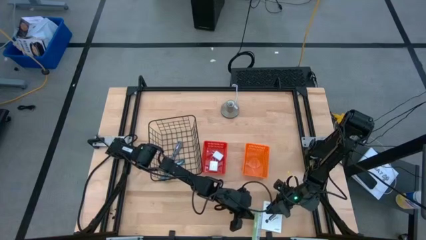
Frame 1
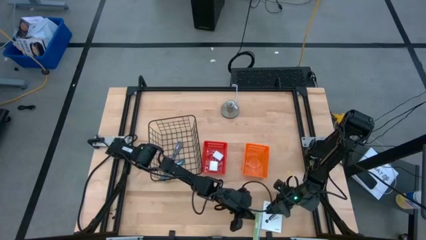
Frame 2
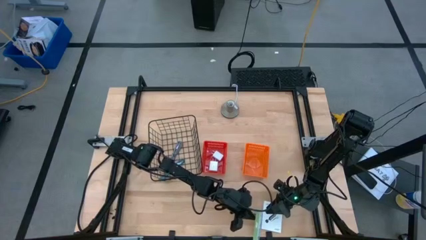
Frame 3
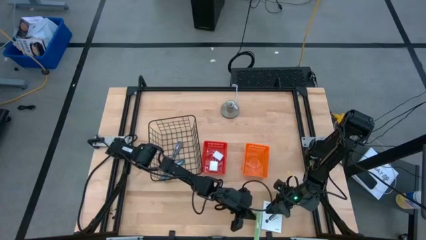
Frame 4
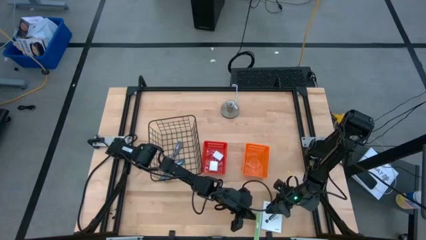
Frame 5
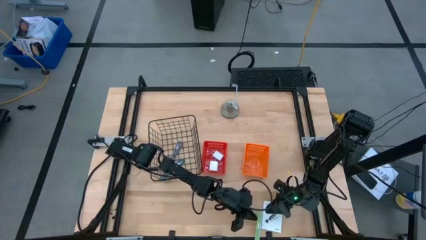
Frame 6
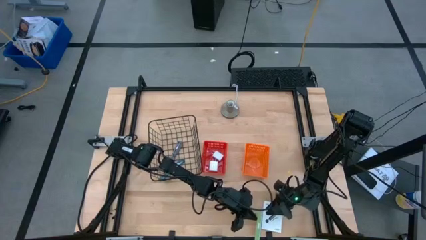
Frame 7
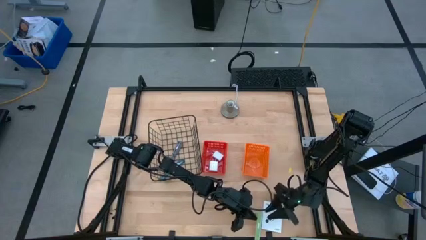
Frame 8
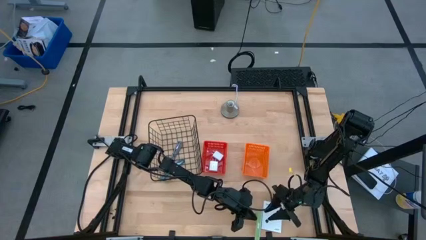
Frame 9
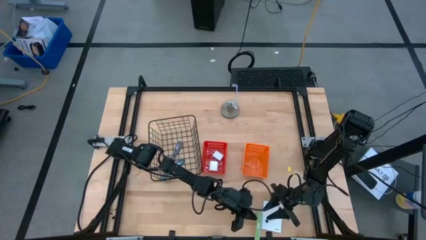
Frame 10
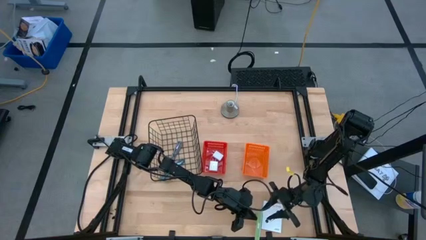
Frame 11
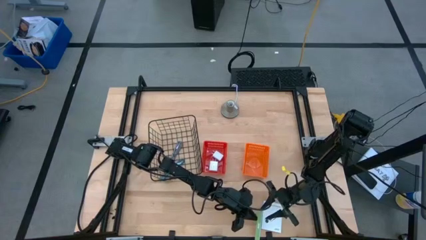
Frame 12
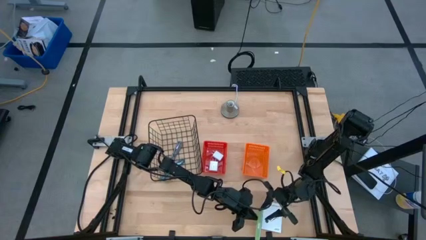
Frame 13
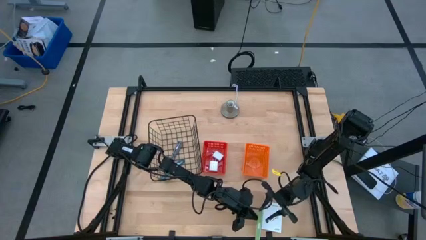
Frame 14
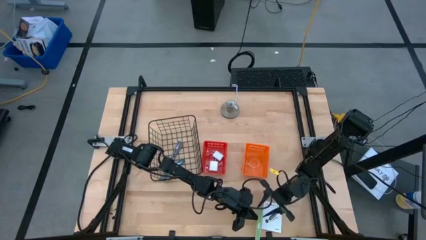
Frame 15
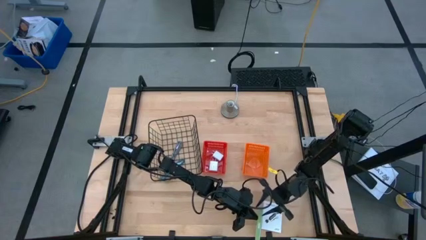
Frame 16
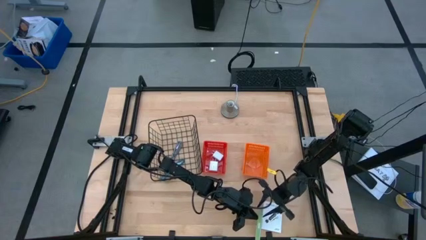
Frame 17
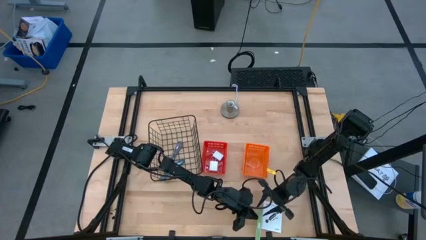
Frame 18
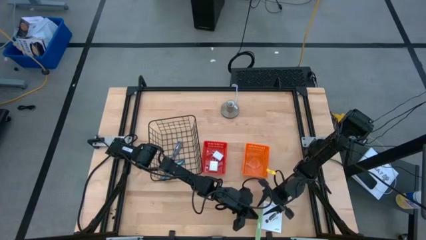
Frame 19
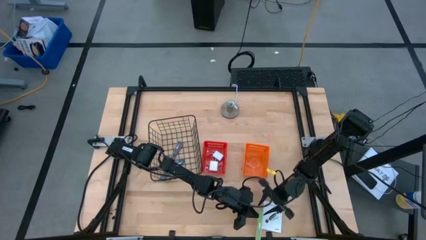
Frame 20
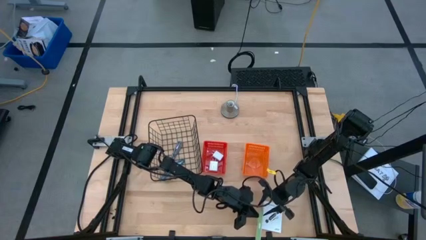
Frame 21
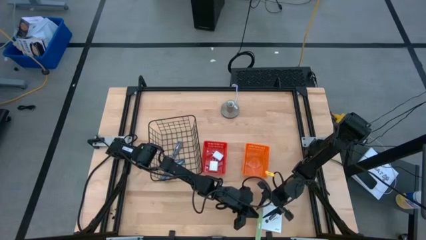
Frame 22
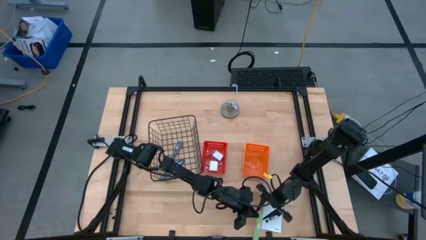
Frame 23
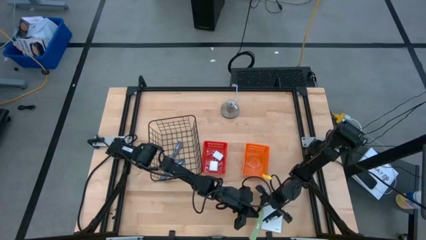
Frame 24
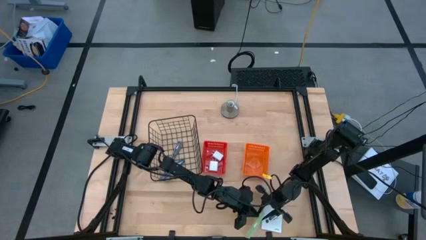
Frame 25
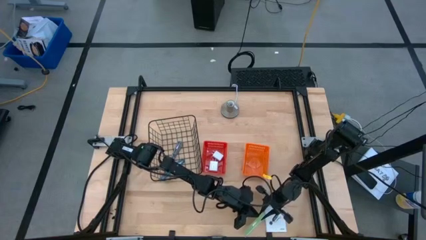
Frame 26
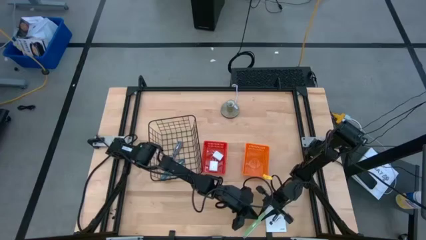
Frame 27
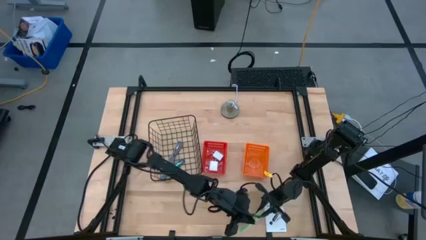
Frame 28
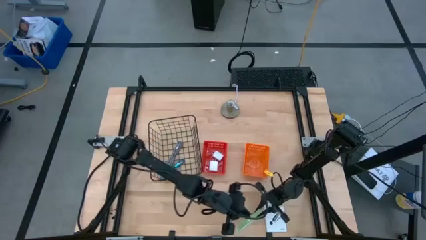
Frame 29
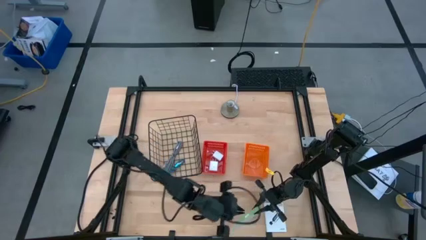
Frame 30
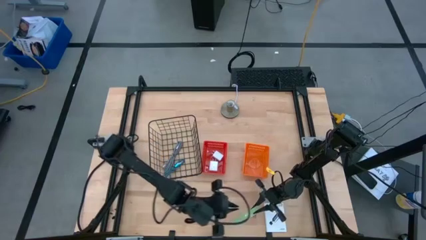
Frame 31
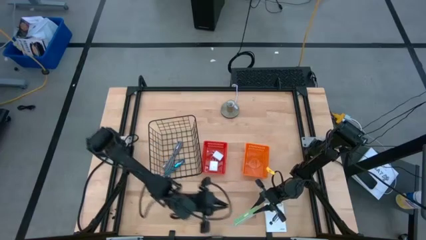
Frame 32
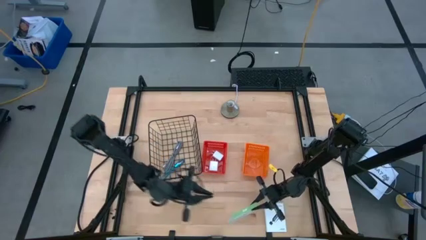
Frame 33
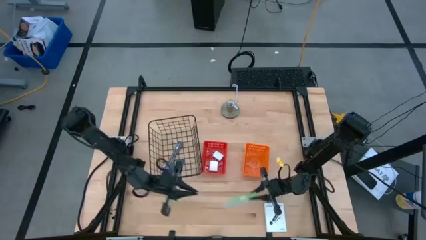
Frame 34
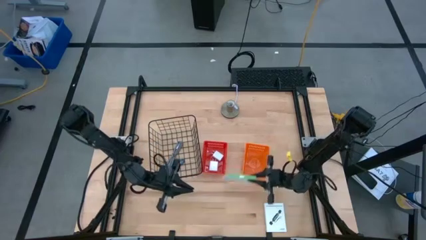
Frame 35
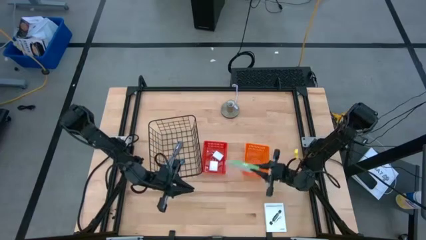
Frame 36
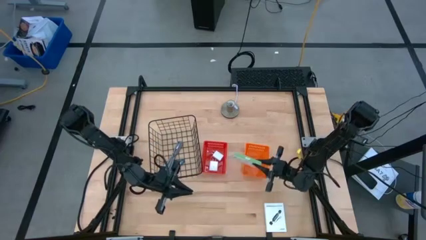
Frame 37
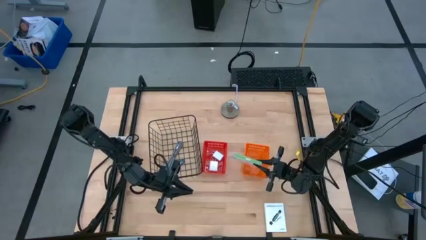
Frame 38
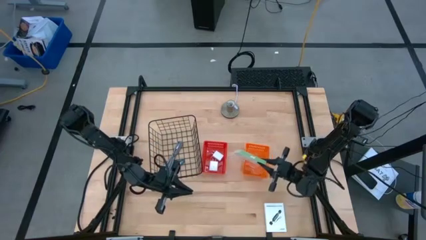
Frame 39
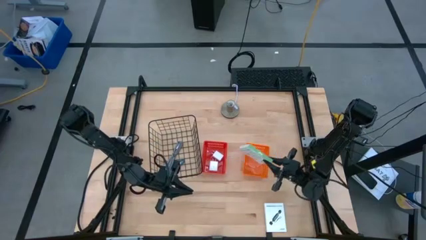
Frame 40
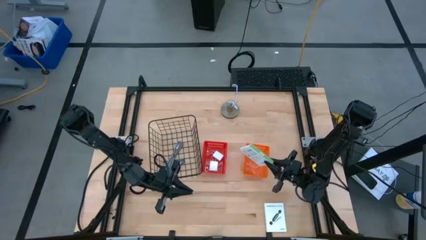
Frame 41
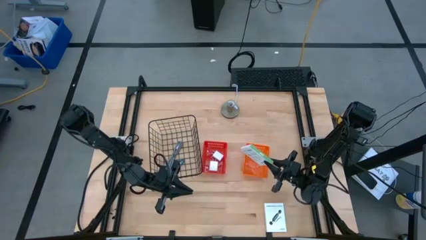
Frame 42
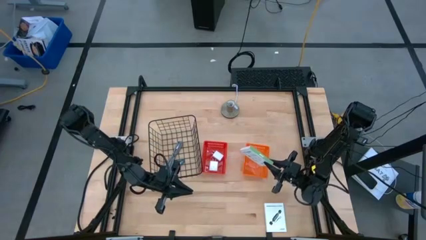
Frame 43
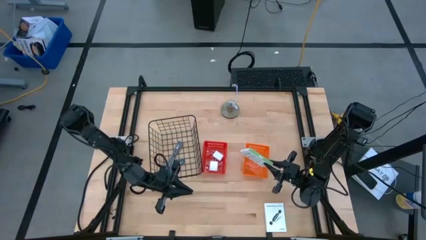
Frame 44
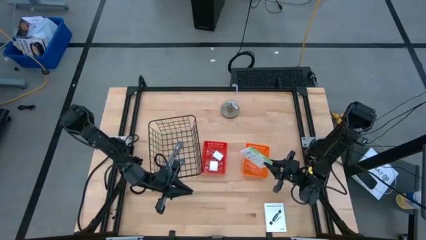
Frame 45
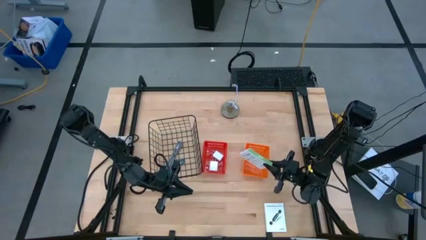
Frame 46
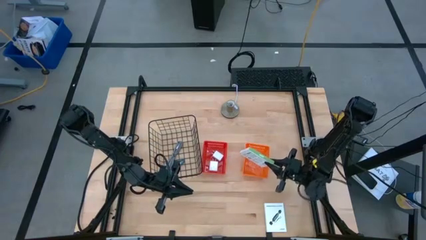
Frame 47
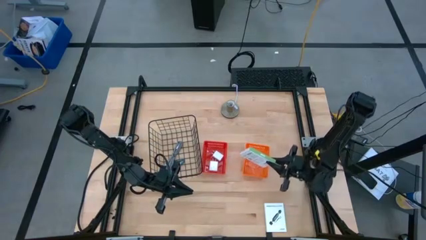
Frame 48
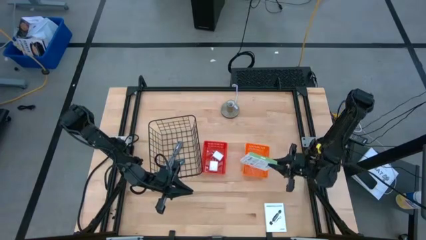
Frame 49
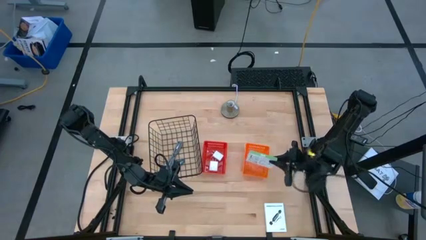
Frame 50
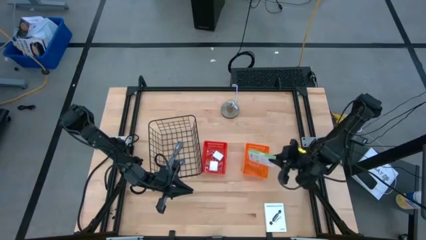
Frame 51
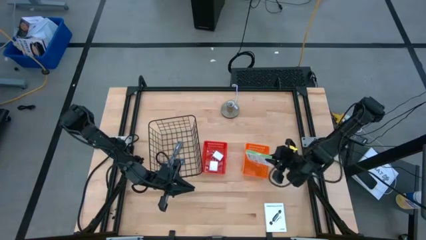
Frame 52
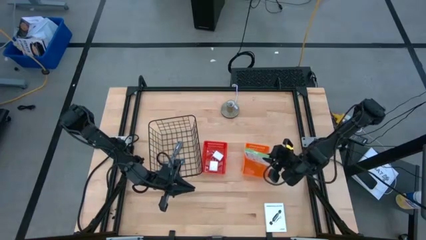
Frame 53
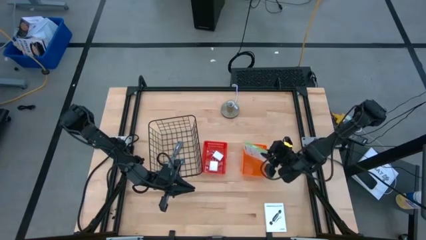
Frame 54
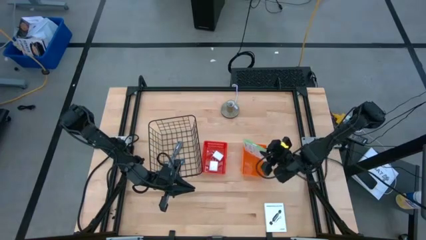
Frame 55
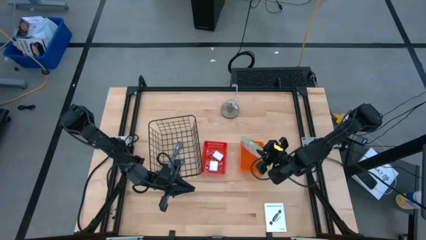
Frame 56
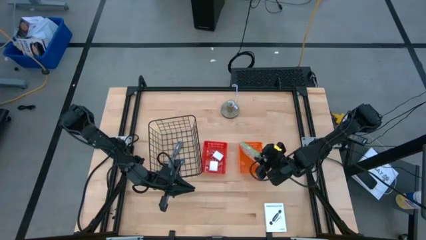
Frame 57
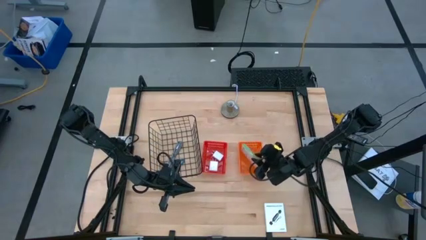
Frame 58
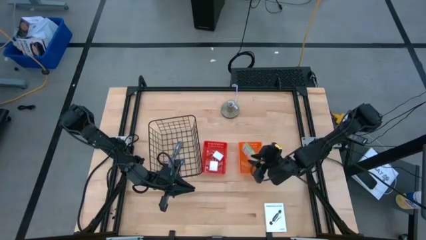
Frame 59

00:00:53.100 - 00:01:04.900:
Task: Pick and place items into bin
Put the white card reader box into the orange basket
